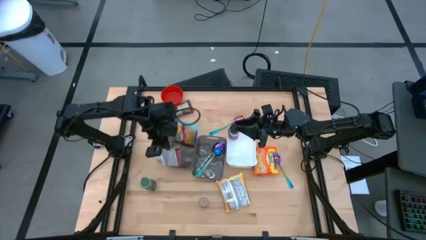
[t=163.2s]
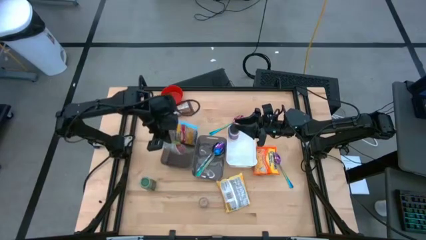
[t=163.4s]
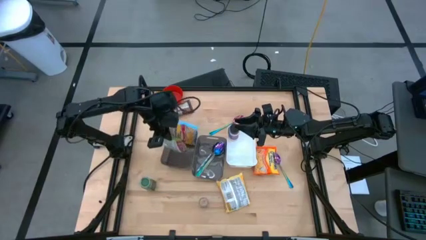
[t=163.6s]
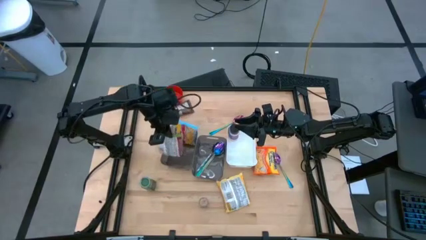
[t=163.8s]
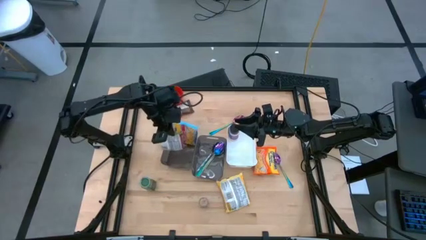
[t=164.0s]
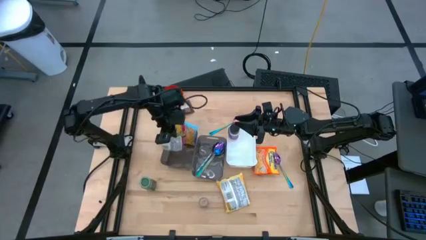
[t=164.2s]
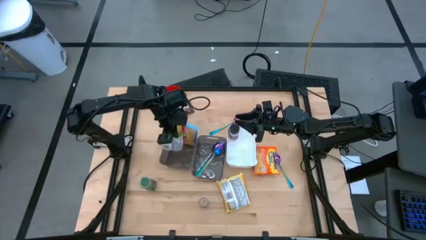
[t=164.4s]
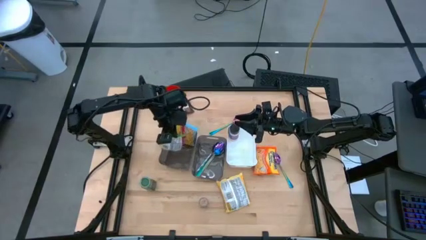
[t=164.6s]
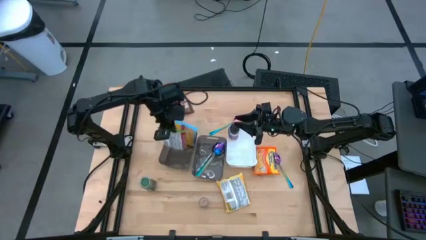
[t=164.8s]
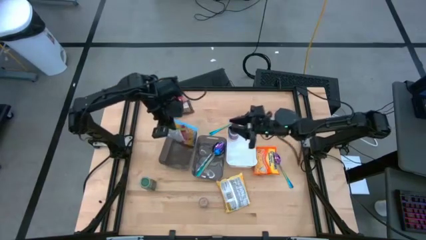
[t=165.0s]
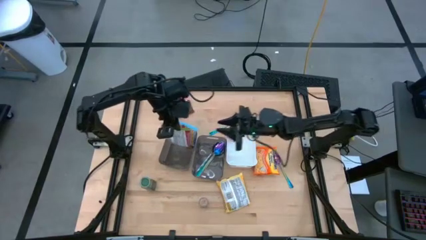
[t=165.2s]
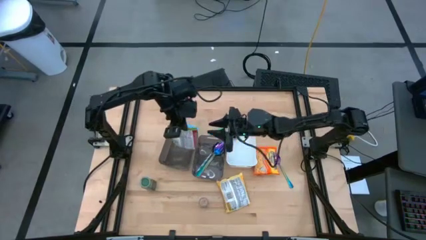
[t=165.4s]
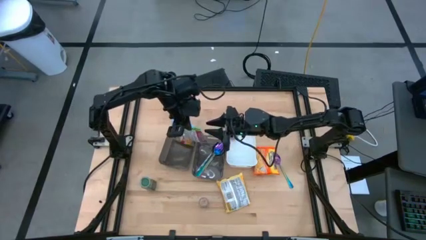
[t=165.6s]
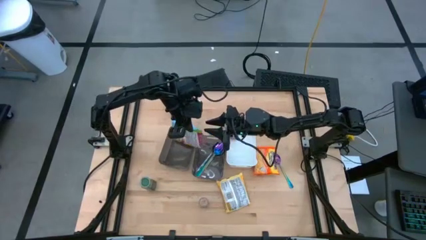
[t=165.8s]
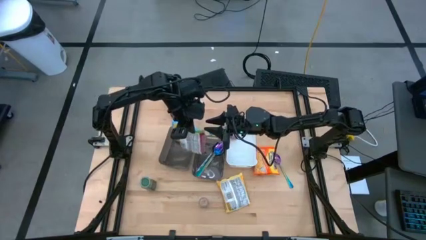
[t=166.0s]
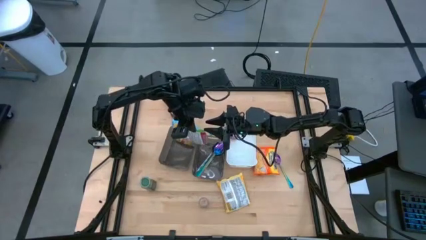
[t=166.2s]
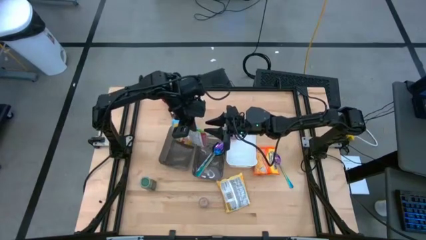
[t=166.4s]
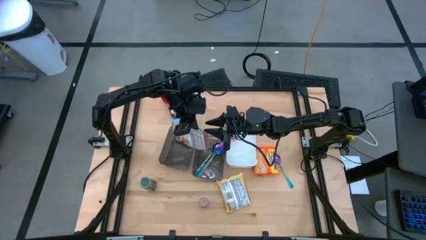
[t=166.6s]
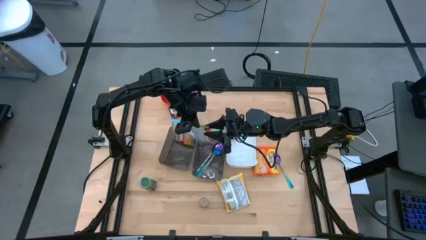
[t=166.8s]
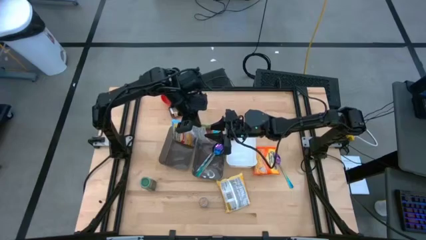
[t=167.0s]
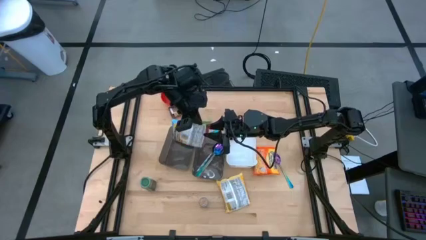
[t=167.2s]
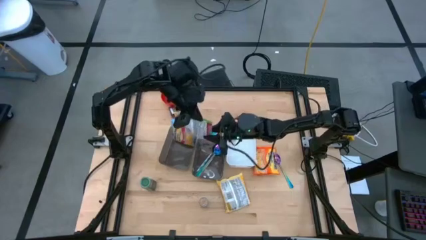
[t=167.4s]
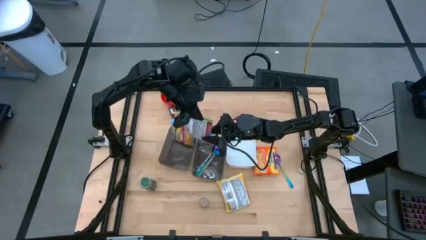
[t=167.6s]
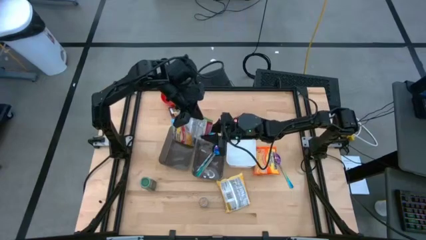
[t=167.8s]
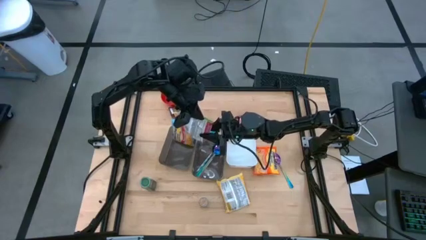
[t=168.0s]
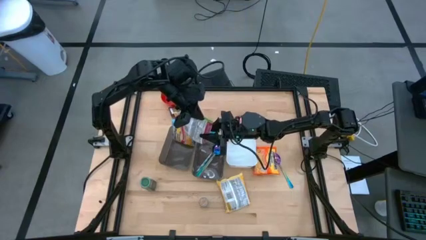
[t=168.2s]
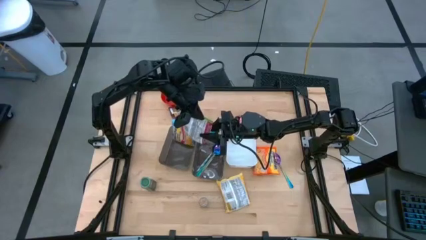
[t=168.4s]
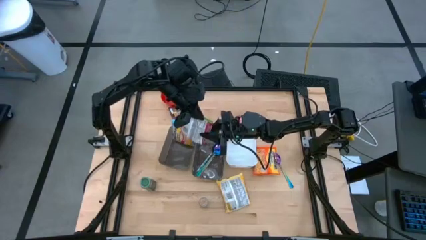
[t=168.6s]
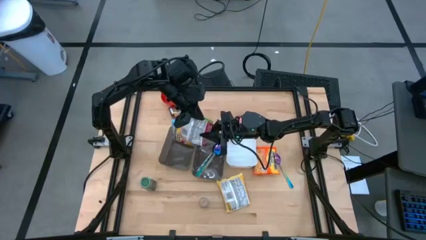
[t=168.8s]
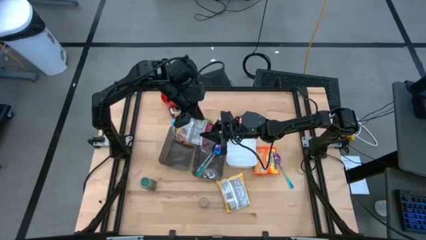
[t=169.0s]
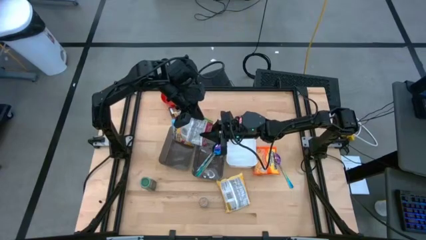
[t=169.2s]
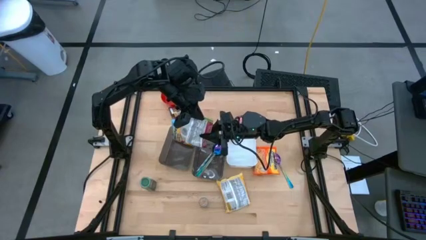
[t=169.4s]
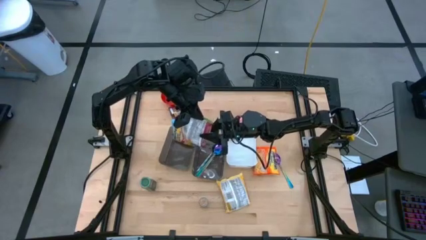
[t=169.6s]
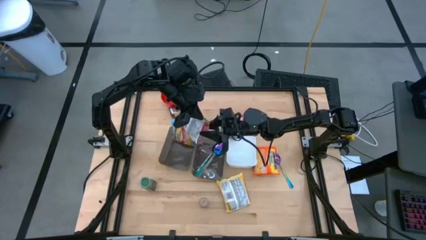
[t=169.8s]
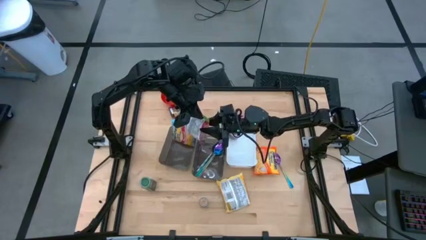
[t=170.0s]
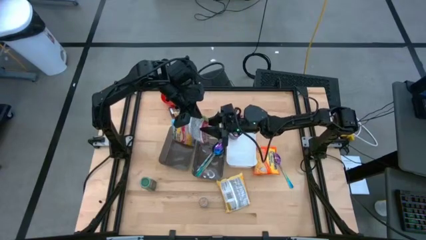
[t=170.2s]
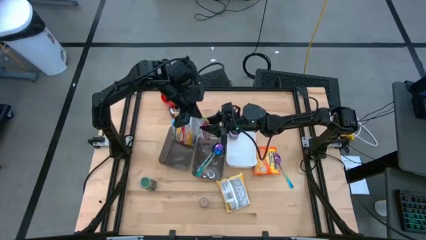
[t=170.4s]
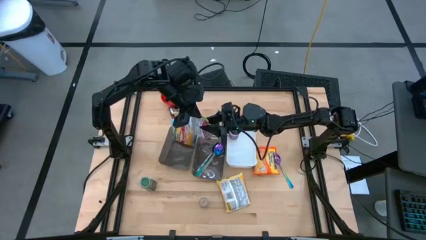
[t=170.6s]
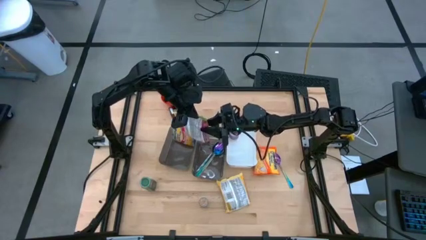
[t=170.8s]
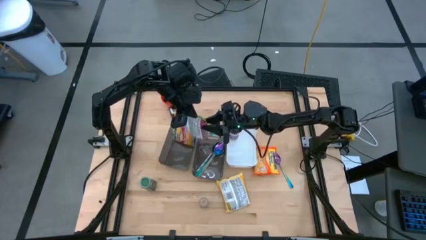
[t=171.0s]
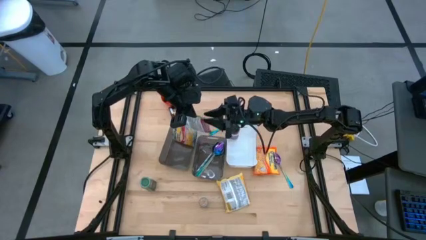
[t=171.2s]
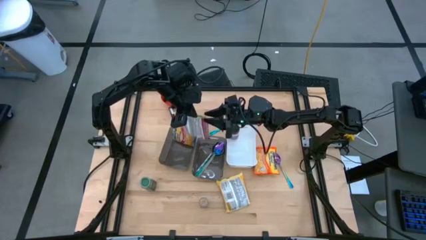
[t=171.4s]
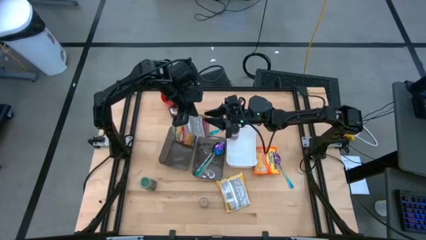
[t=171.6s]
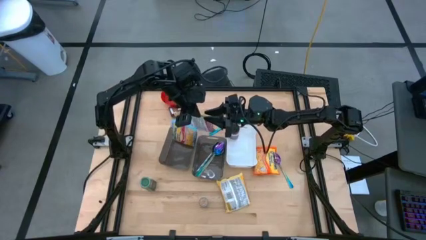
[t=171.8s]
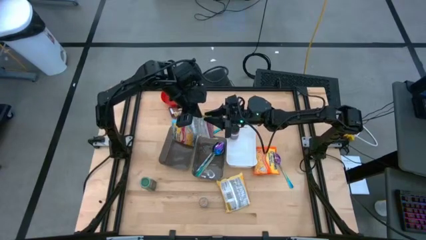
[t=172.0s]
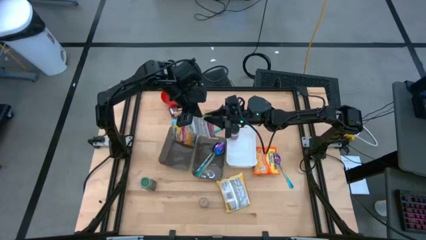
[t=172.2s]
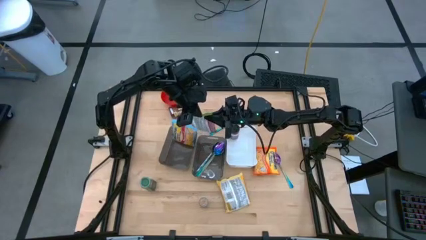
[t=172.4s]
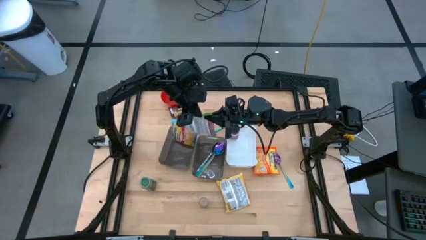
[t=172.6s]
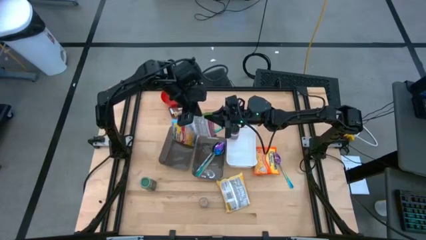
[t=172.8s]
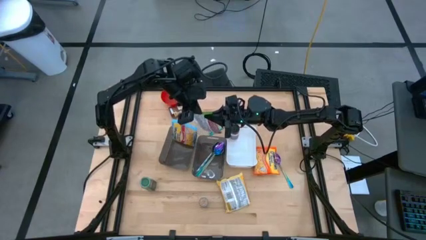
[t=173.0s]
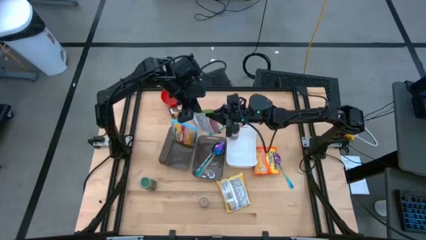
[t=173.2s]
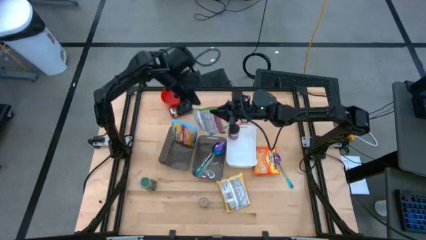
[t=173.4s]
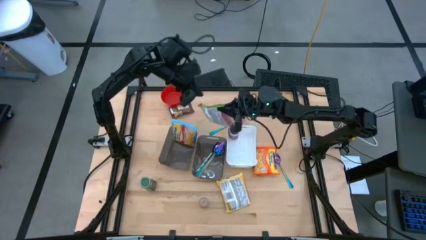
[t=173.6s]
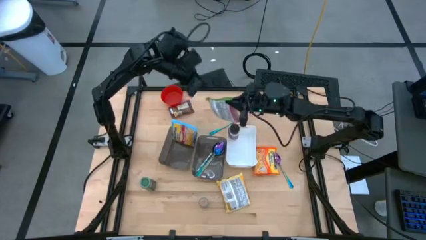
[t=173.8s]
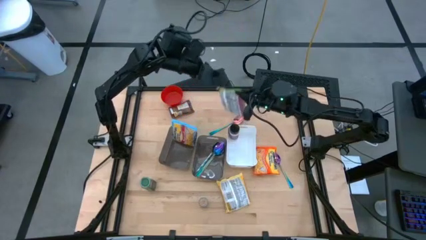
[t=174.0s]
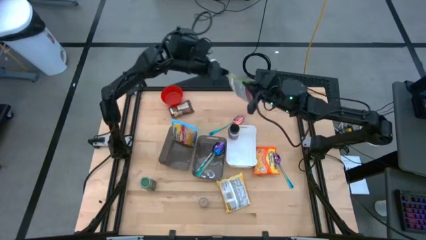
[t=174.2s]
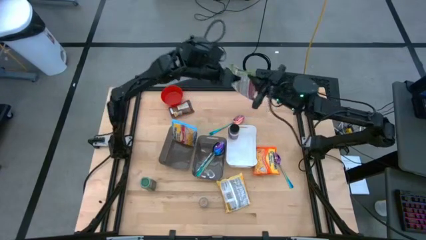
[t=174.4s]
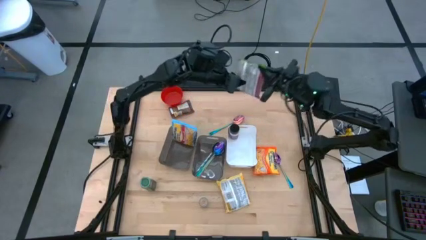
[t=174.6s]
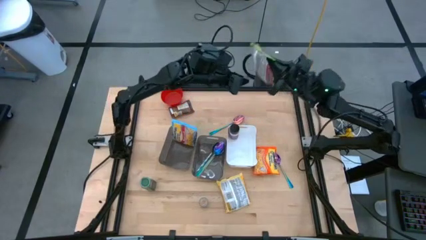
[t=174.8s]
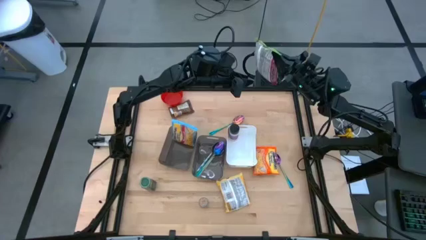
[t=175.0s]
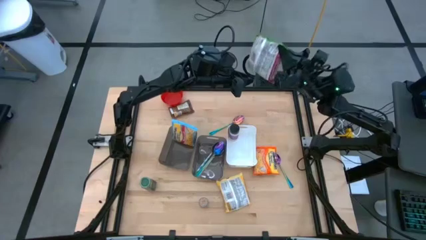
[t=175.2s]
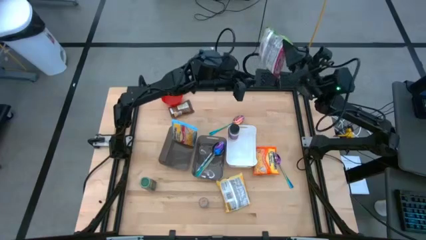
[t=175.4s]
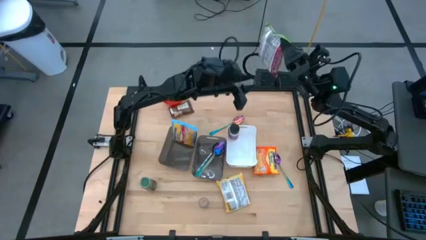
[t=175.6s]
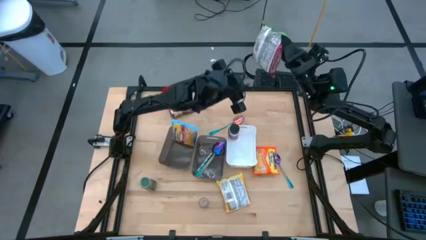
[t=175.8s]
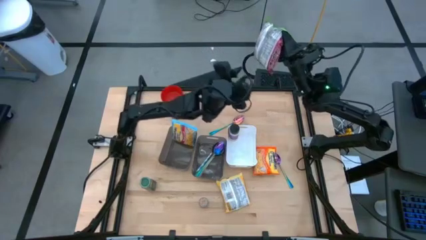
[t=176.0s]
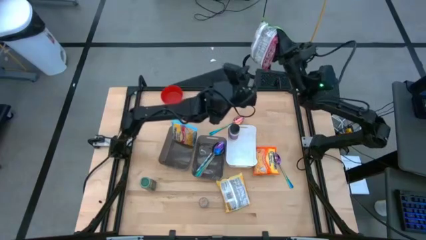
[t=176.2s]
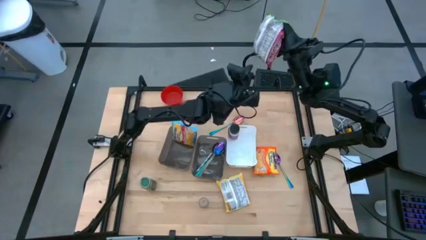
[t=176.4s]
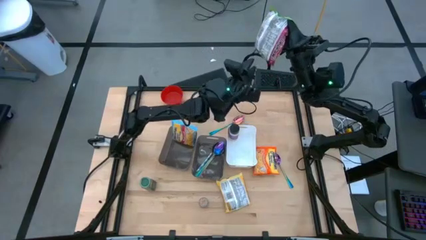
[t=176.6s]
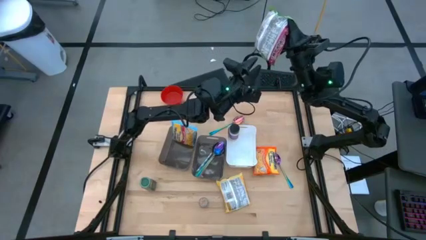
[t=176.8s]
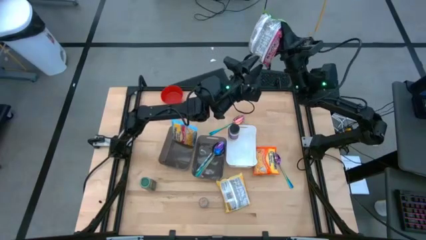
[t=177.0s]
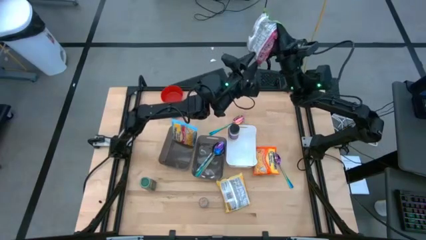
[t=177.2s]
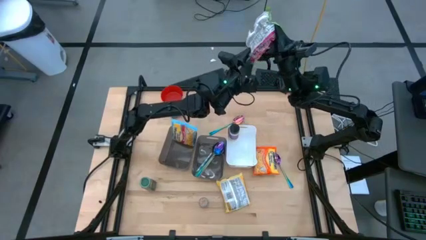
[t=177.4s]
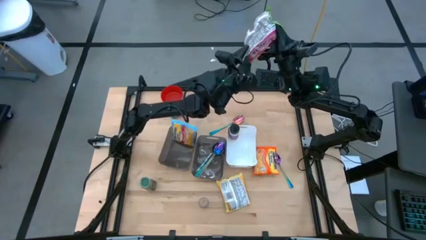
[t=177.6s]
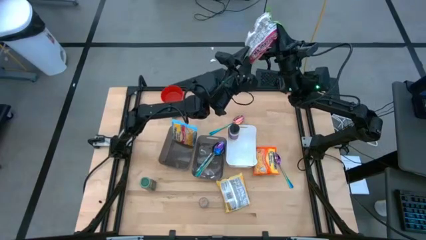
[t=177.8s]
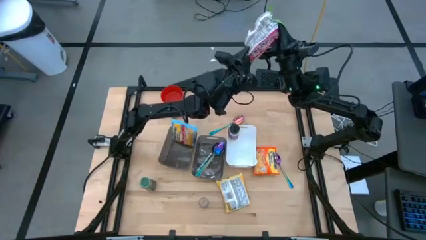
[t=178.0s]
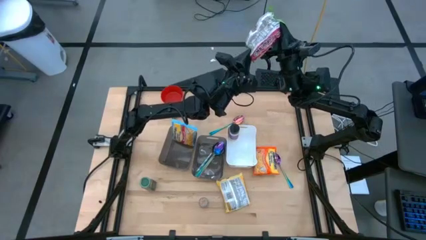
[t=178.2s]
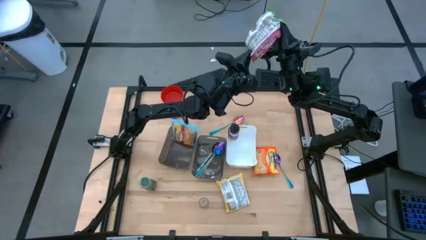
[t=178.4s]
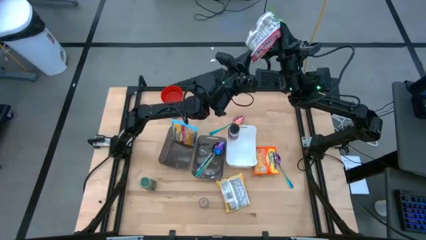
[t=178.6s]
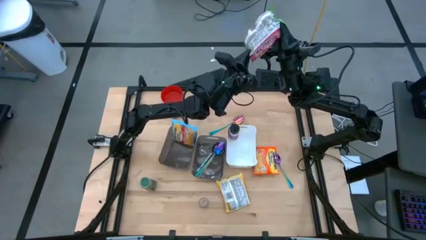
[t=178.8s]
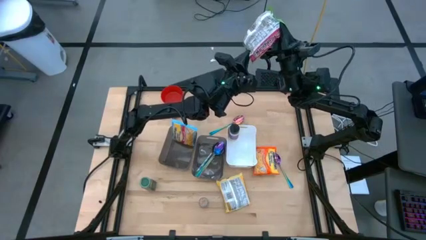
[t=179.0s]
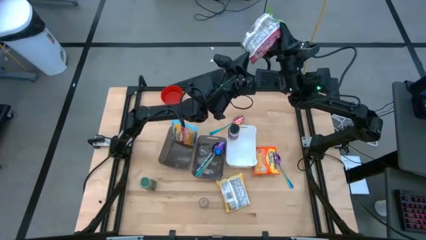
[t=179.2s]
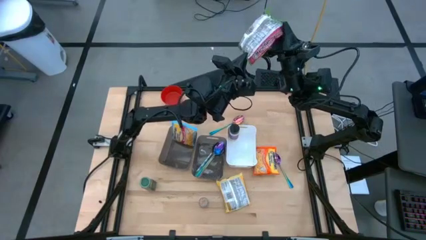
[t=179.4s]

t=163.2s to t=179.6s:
Task: Pick & Place Food Item
Put the green pack into the left gray bin

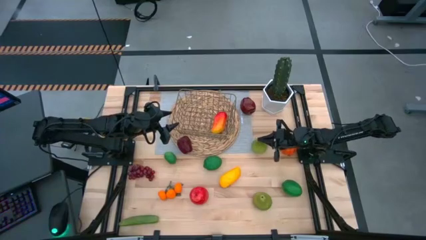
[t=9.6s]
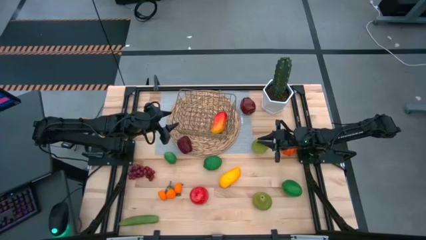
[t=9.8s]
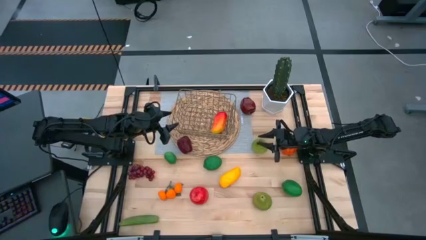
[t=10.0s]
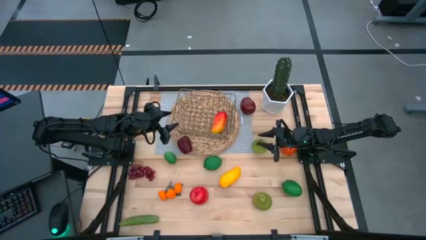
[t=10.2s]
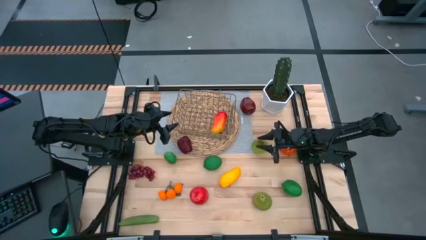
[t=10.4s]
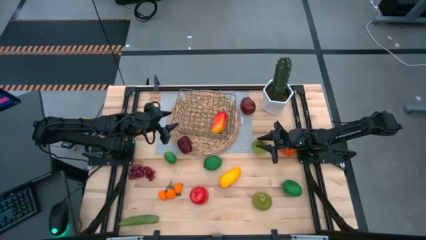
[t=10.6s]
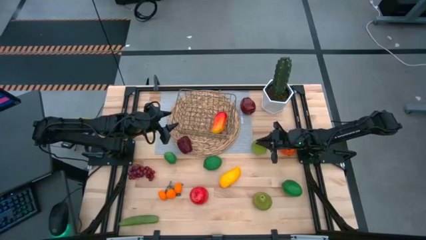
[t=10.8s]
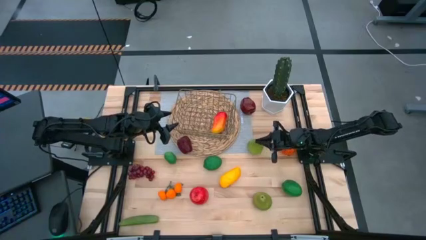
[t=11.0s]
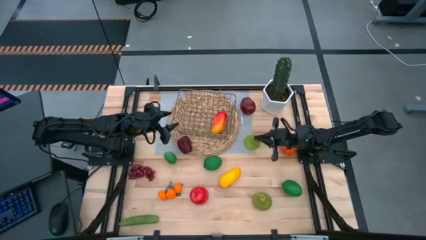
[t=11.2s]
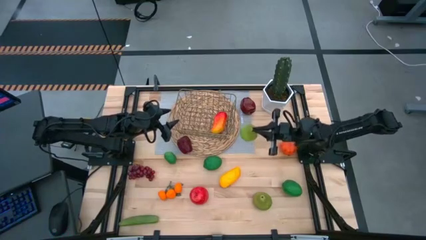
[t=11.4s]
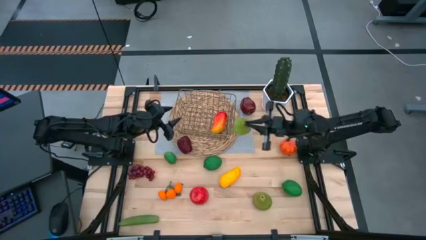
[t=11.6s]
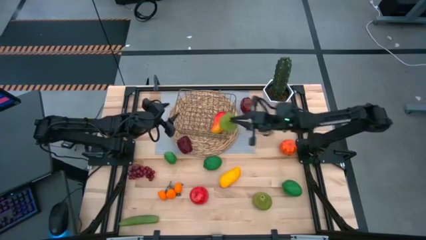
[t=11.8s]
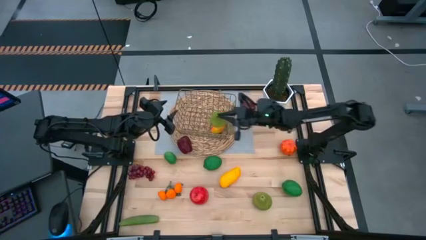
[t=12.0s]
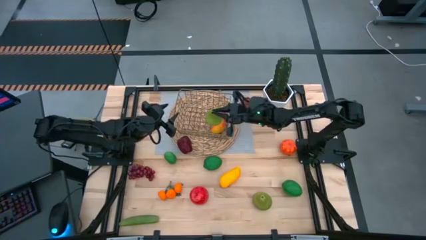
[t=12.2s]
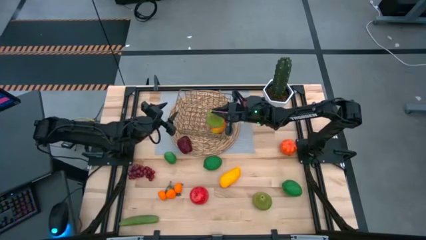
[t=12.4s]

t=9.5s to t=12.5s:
Task: Build produce basket
Put the top green pear into the gold wire basket
